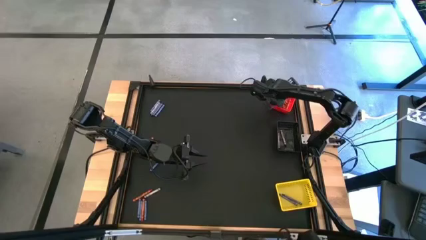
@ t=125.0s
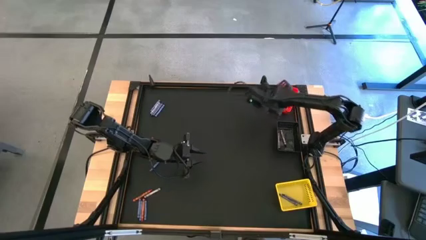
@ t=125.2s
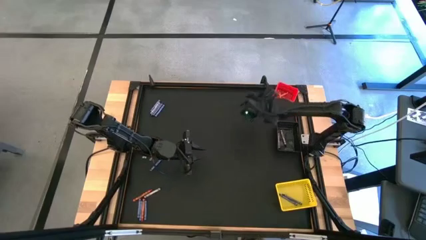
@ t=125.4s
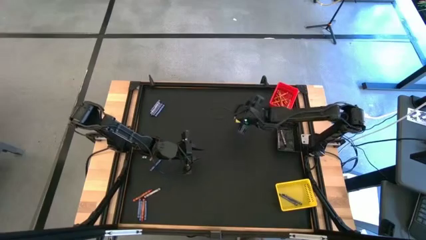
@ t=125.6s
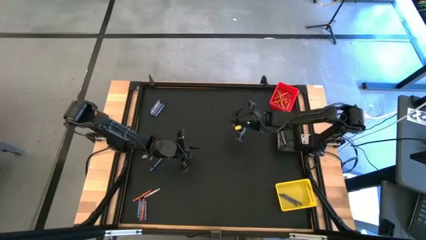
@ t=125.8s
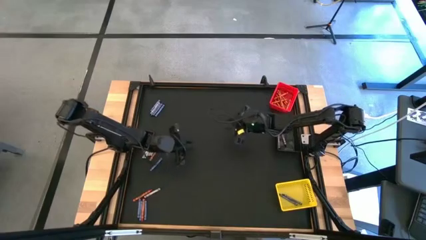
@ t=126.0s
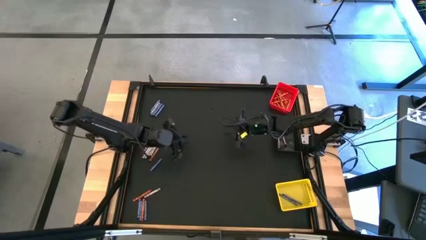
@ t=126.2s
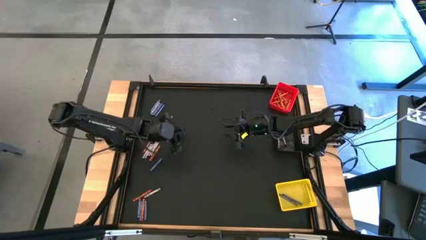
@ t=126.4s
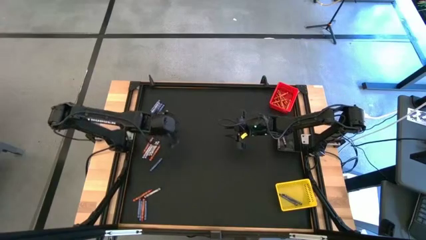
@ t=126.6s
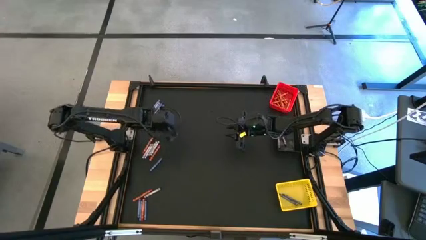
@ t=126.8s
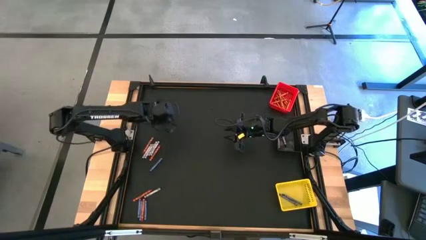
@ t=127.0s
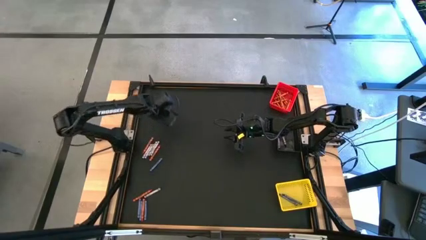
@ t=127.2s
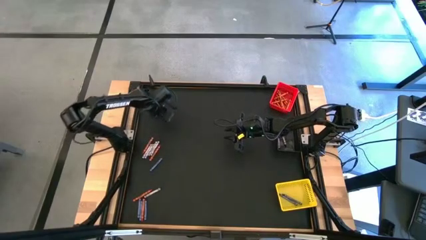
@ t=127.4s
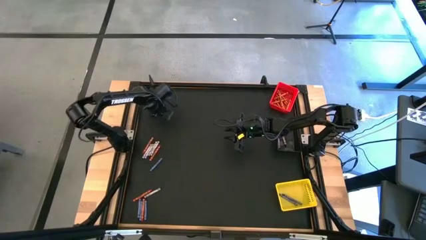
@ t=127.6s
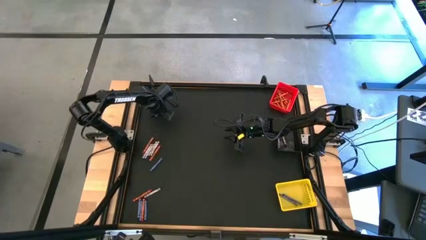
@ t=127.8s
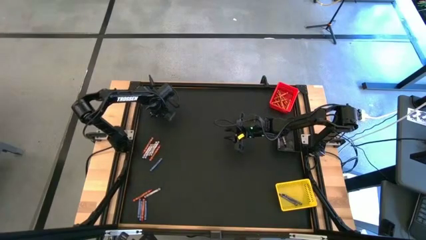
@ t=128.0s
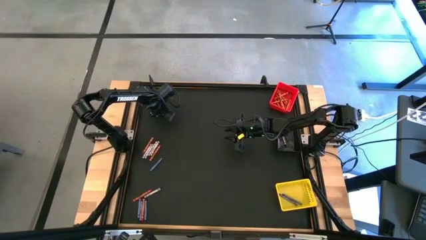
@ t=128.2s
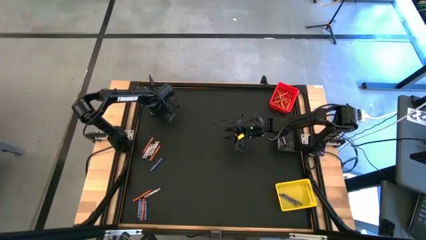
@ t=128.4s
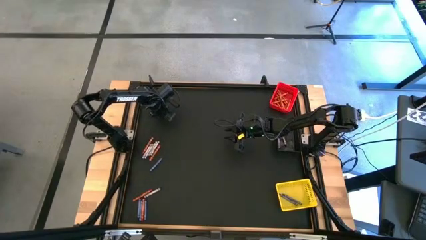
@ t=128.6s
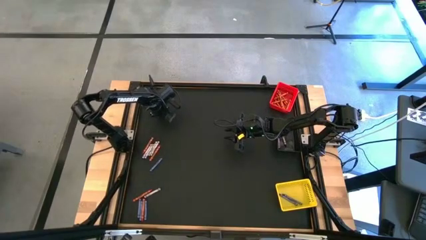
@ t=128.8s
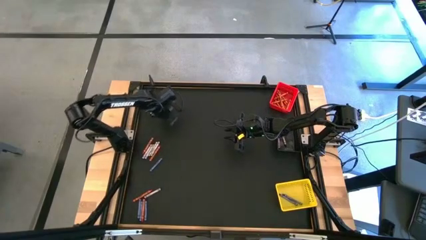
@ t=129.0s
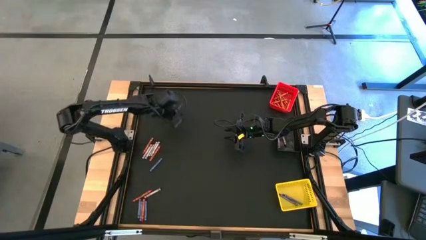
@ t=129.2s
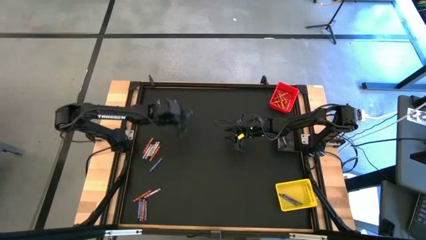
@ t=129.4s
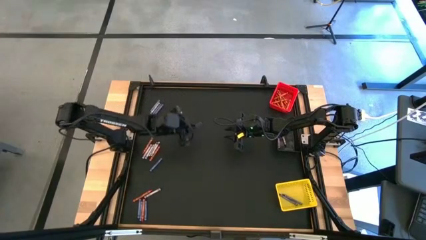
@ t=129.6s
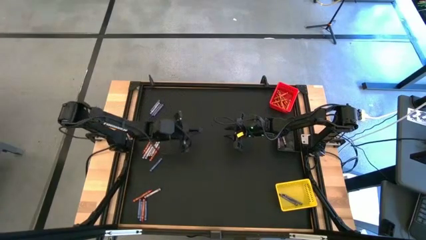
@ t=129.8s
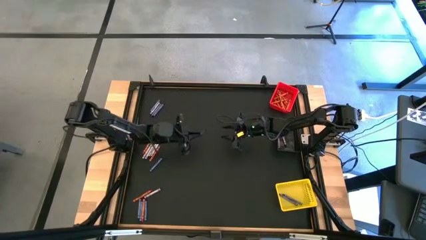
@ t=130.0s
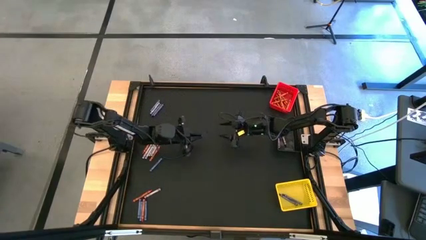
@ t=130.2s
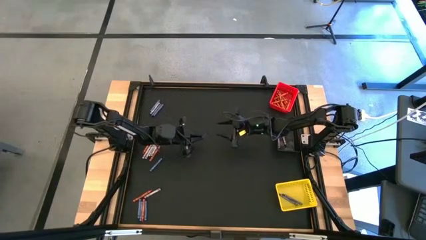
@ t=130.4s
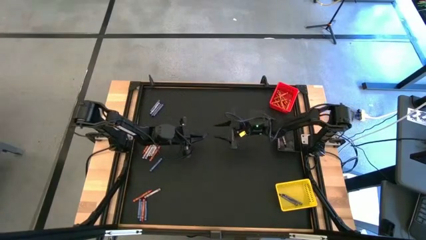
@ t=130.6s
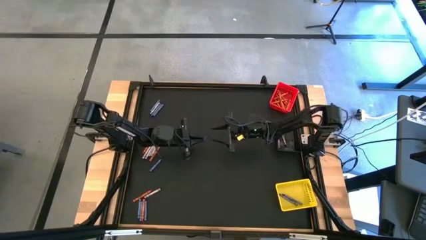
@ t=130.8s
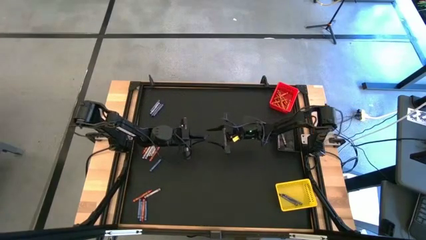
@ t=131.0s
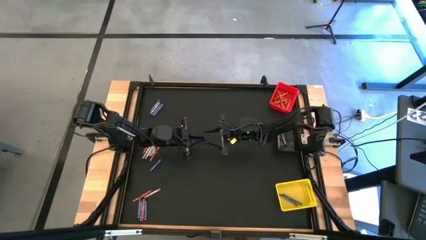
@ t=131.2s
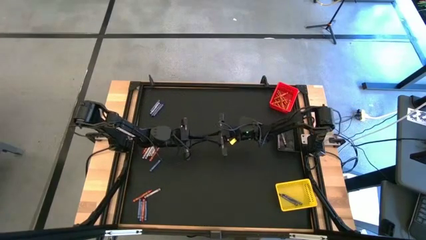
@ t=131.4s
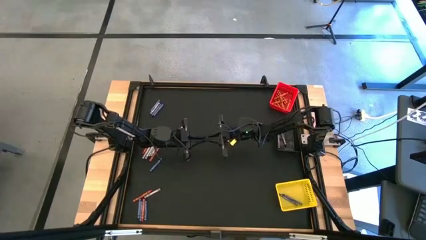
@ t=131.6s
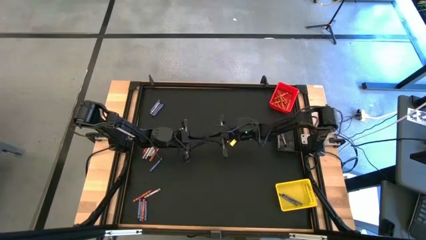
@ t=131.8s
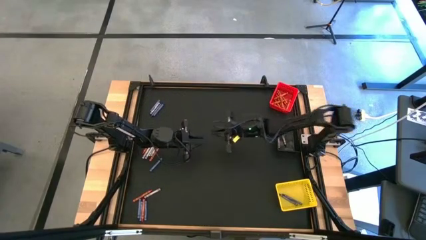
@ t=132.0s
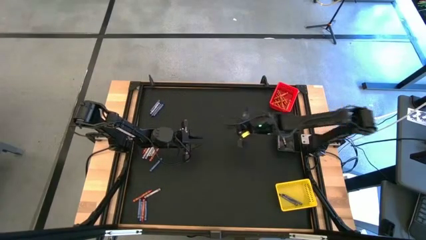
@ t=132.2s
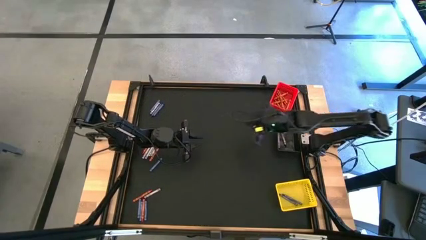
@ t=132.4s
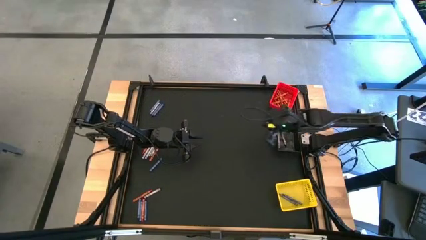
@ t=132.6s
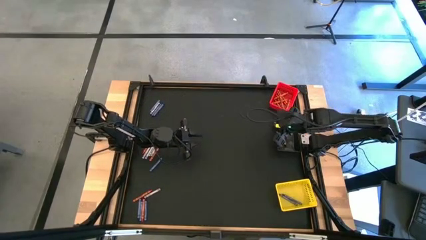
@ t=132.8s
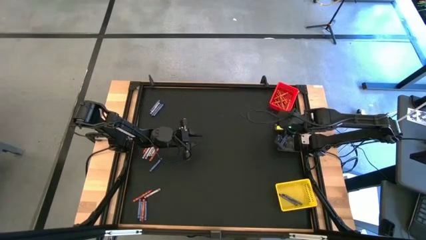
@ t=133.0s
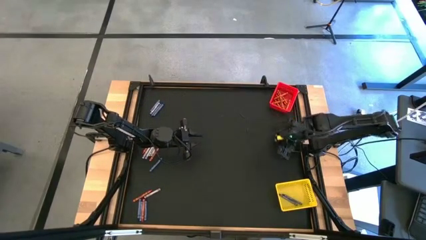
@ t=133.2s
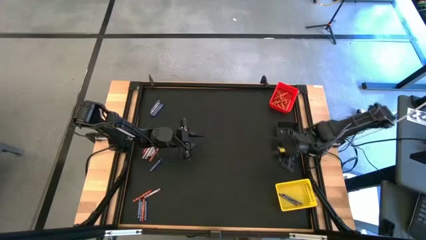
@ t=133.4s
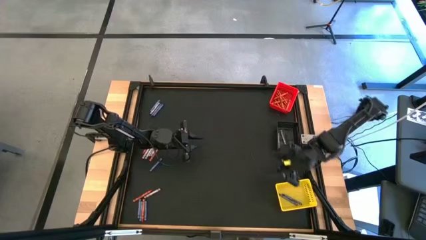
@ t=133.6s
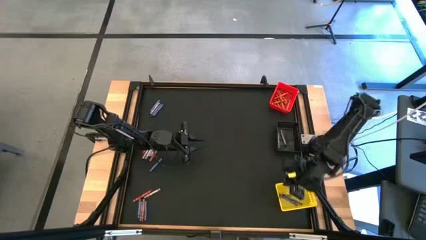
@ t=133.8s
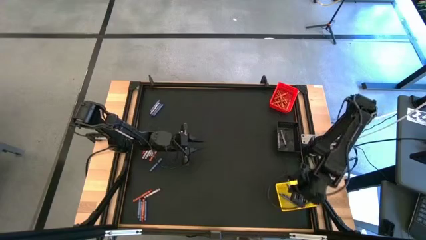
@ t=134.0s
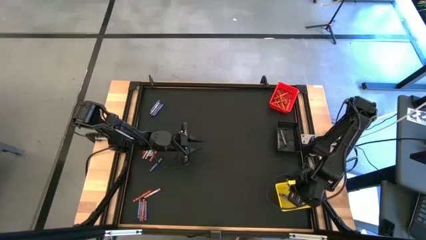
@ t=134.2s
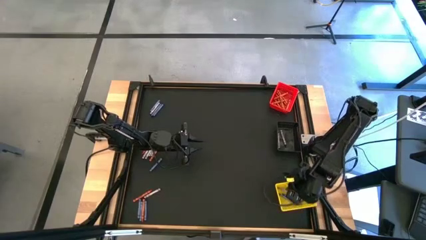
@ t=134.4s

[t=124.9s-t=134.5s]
Task: Sort crayons
Put the blue crayon into the yellow bin

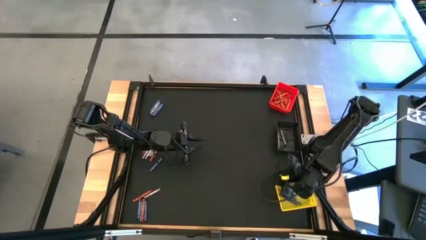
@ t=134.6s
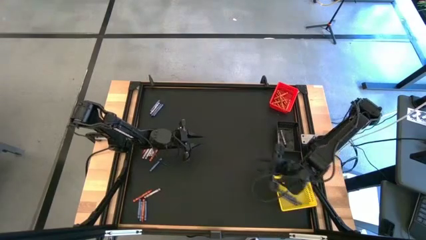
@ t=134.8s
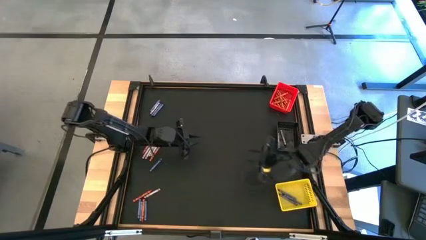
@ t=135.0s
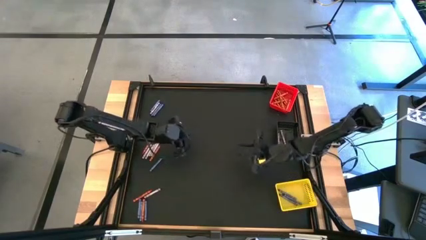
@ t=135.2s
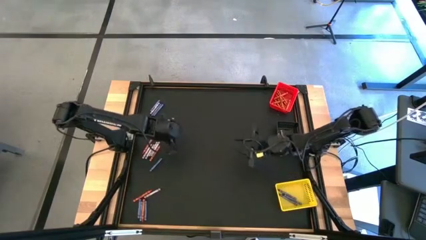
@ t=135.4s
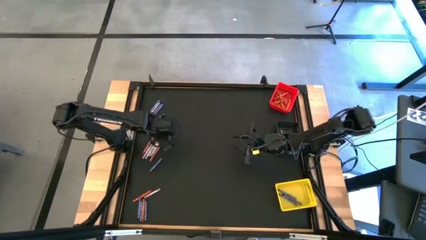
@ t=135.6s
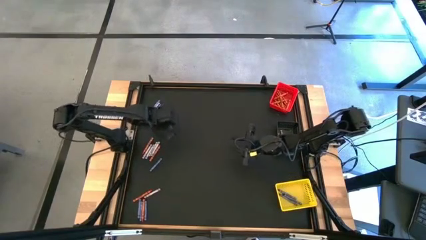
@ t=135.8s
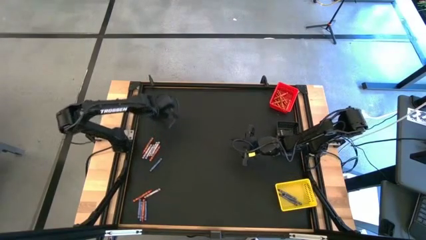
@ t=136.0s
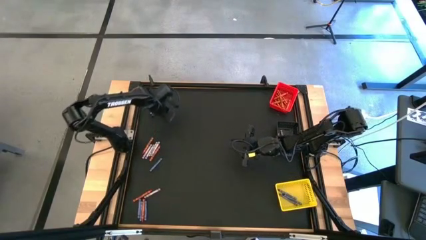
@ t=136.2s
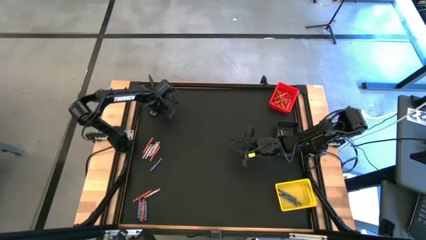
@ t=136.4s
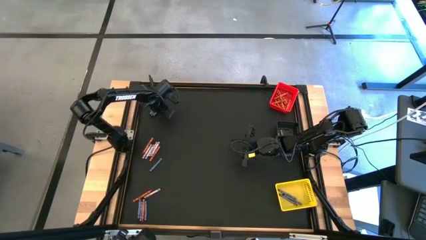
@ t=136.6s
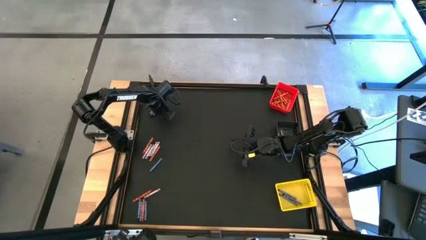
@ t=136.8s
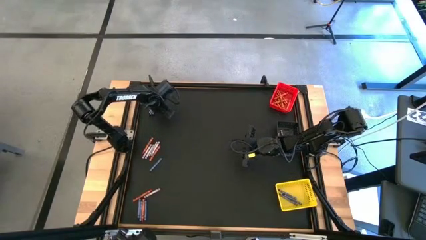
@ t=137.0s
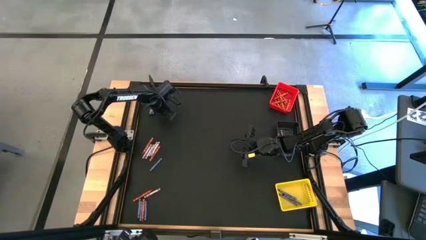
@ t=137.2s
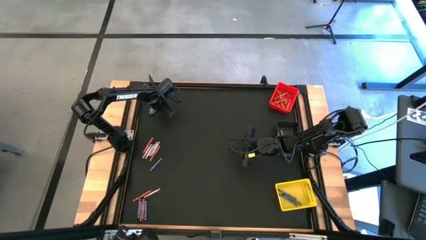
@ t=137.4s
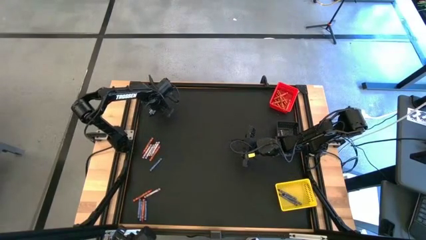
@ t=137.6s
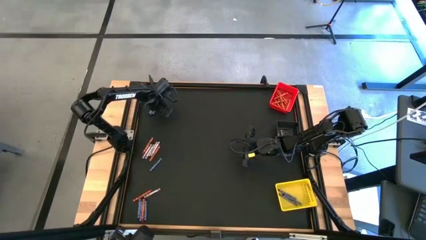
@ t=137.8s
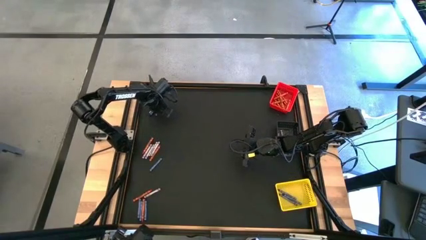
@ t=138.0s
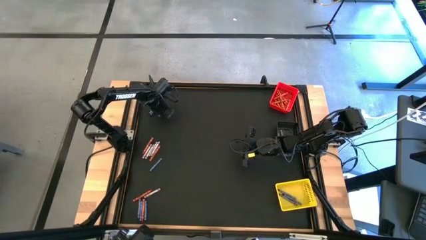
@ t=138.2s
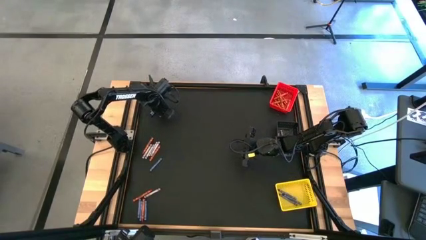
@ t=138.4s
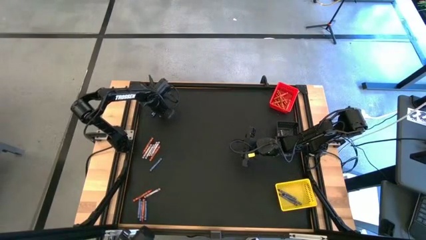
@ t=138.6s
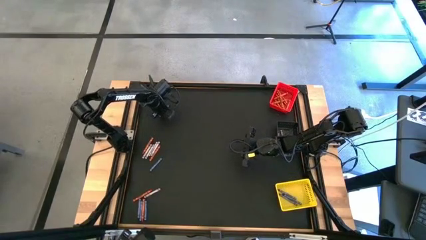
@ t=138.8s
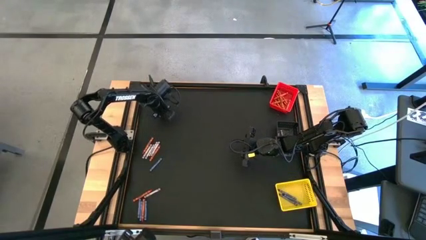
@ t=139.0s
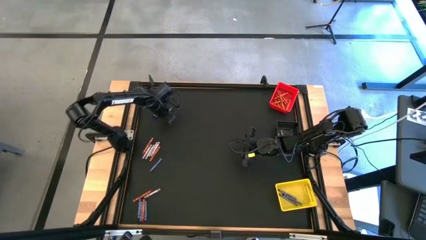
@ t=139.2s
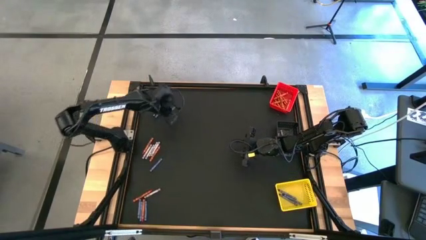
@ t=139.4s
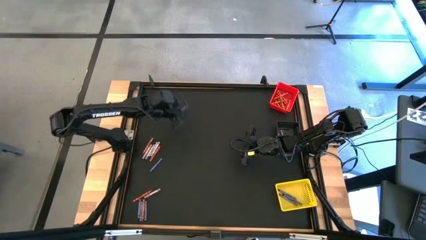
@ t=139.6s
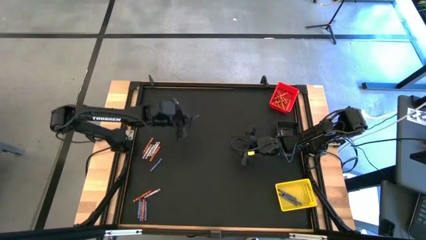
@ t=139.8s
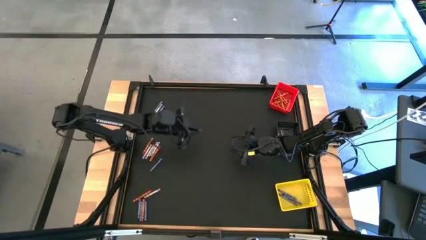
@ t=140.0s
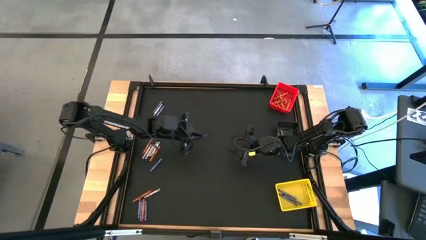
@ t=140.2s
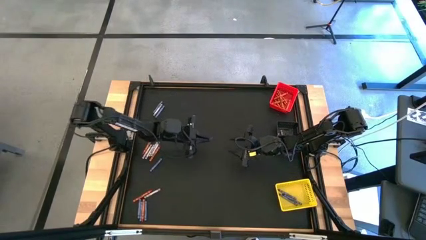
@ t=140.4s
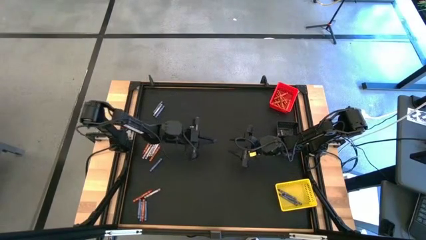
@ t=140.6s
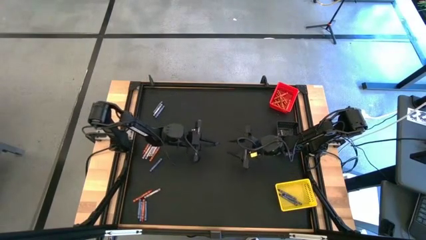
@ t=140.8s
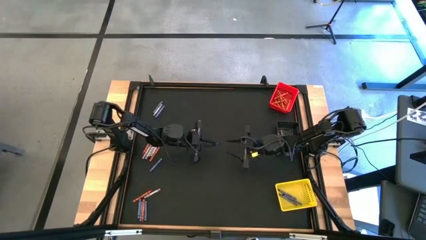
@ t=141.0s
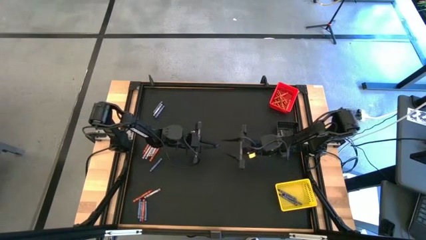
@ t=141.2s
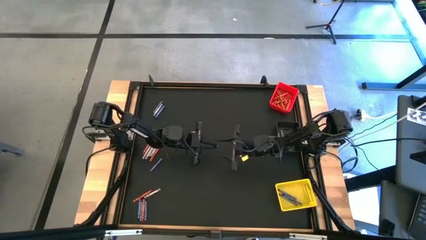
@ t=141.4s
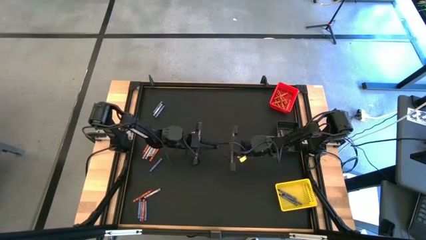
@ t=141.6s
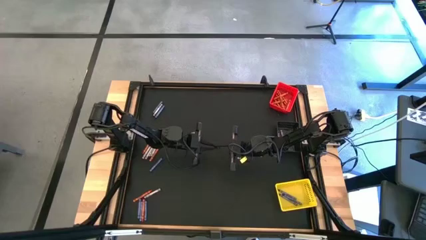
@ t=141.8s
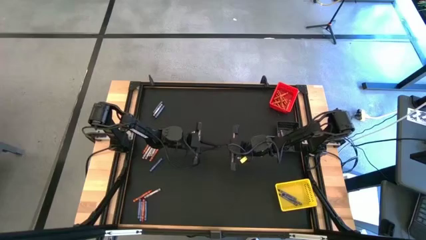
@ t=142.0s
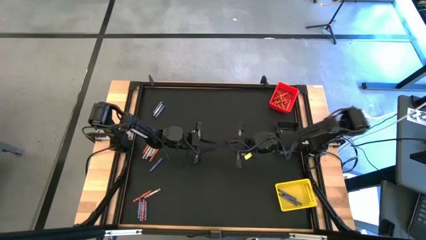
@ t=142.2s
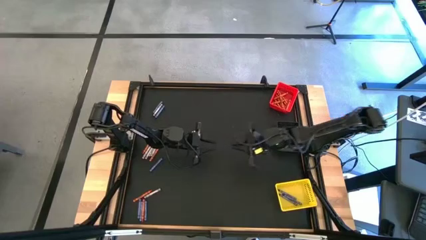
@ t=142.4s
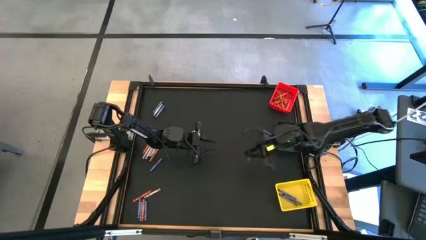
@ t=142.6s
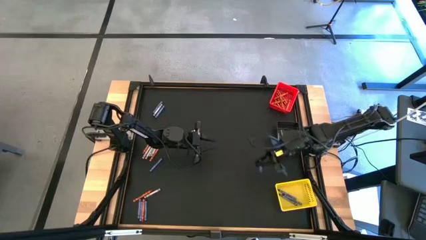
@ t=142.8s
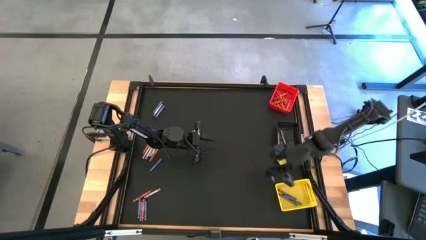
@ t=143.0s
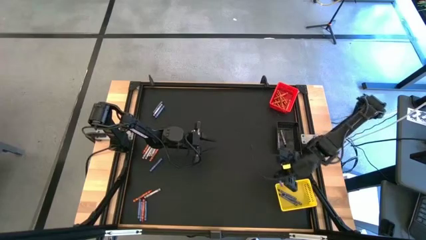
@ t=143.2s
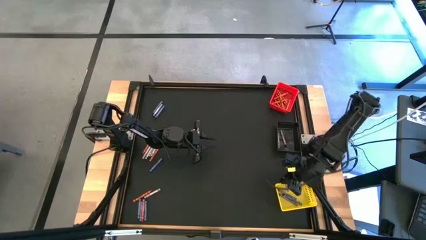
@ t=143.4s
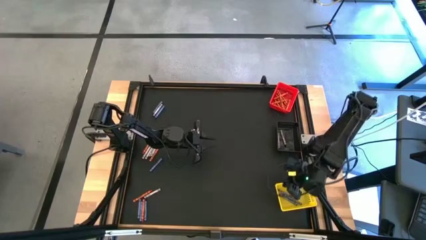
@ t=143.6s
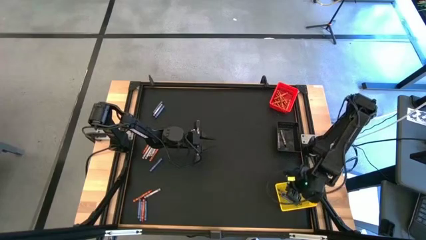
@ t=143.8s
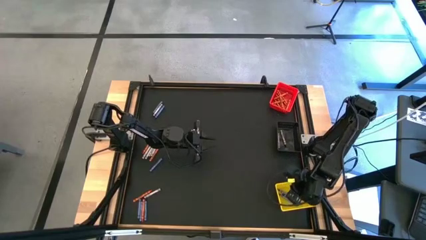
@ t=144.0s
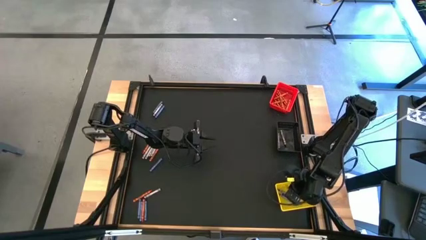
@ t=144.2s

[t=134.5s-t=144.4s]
Put the blue crayon into the yellow bin
